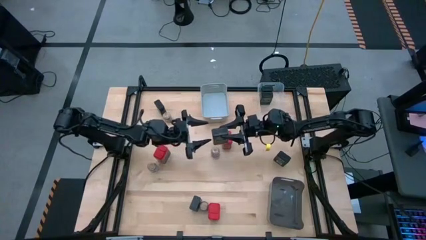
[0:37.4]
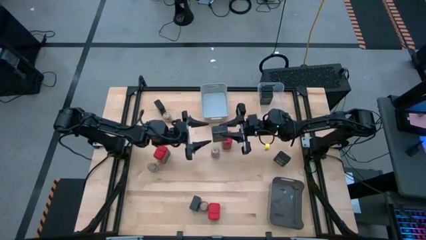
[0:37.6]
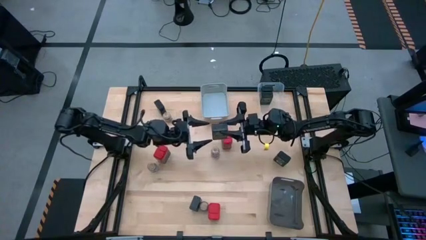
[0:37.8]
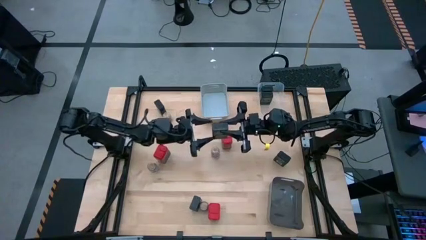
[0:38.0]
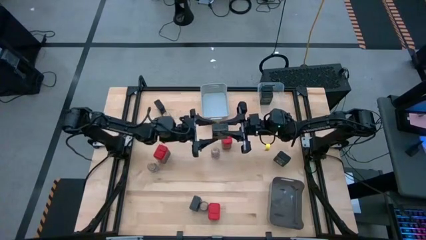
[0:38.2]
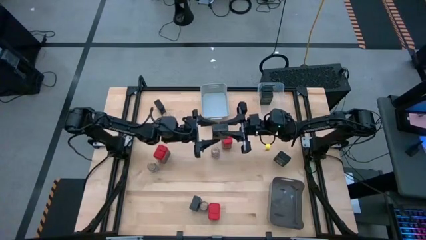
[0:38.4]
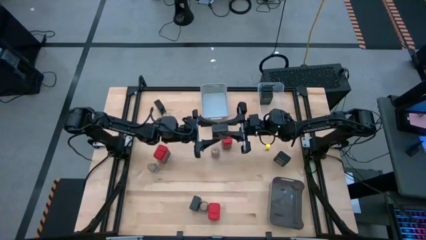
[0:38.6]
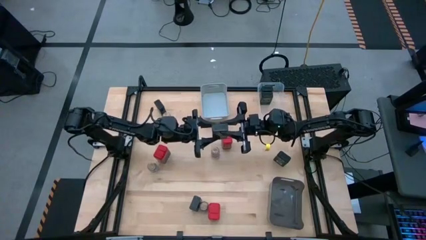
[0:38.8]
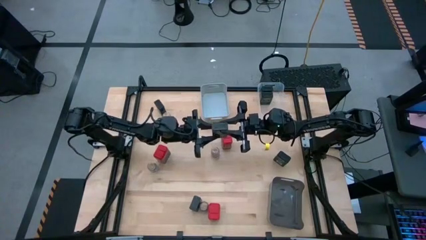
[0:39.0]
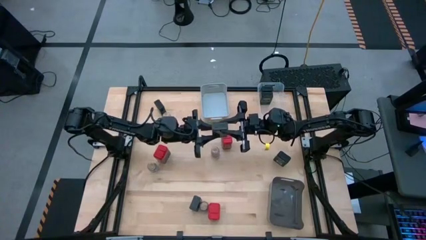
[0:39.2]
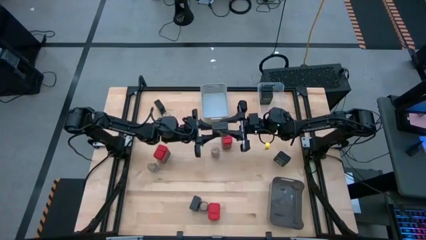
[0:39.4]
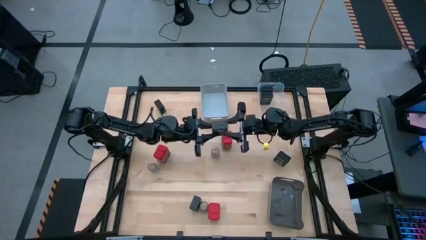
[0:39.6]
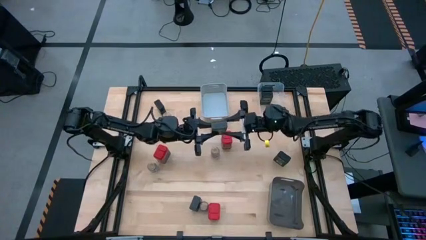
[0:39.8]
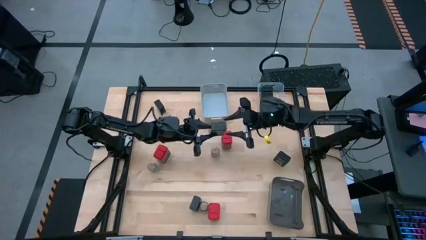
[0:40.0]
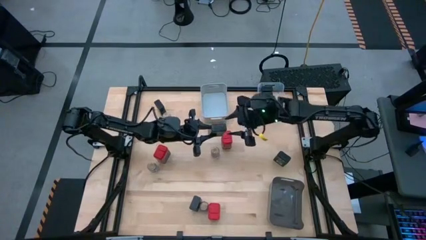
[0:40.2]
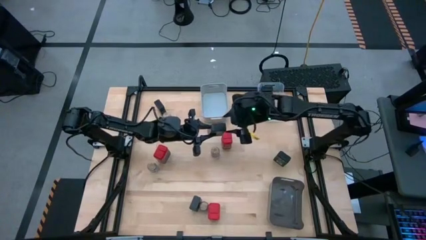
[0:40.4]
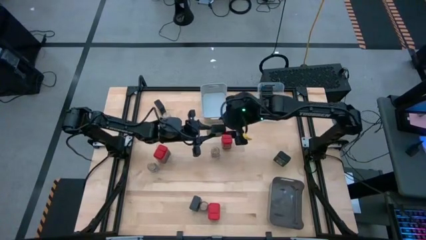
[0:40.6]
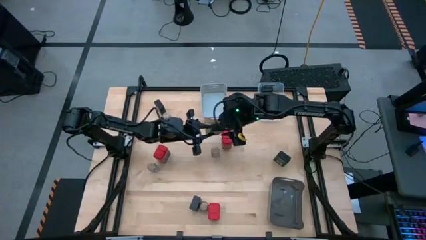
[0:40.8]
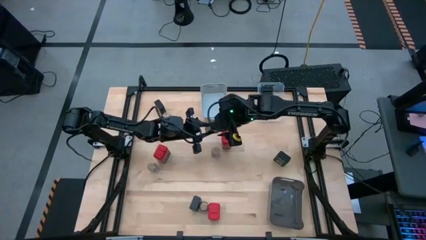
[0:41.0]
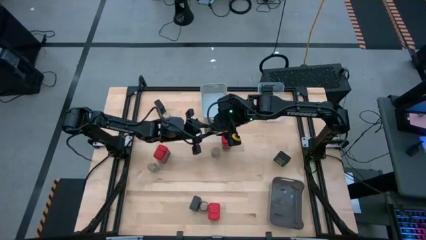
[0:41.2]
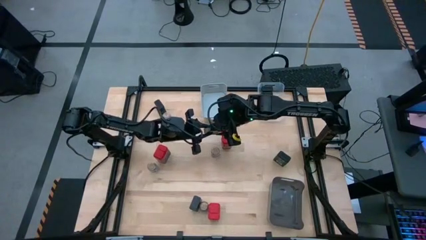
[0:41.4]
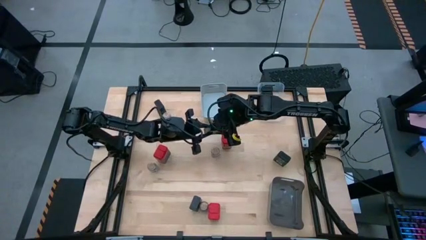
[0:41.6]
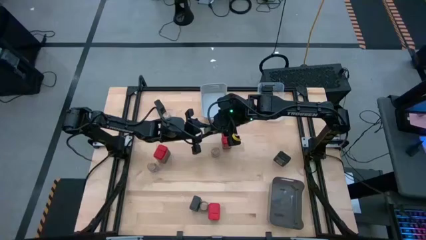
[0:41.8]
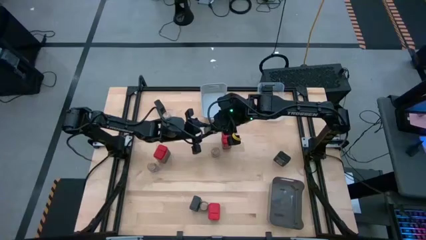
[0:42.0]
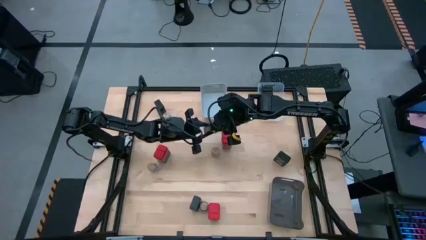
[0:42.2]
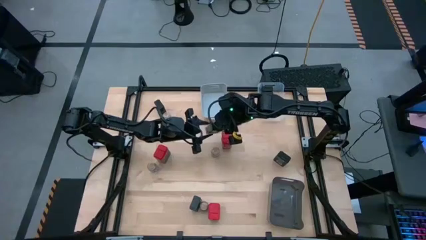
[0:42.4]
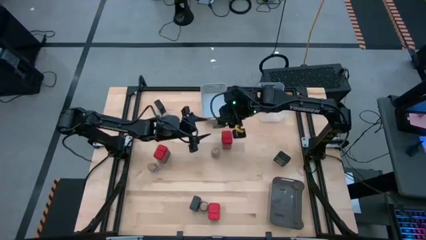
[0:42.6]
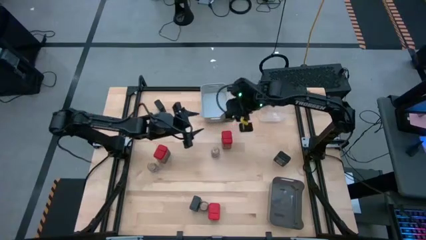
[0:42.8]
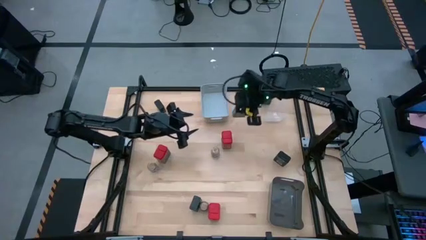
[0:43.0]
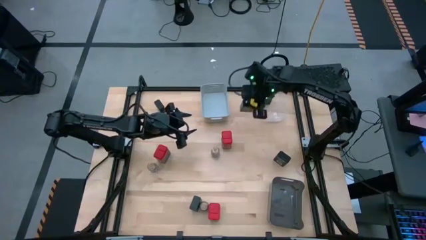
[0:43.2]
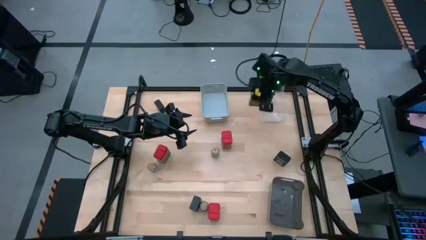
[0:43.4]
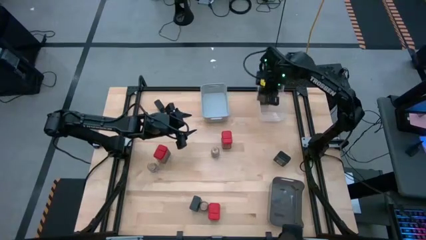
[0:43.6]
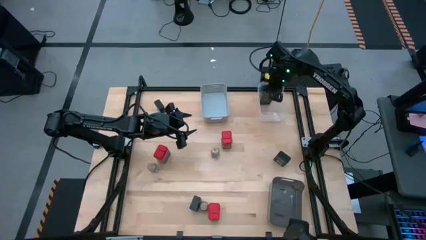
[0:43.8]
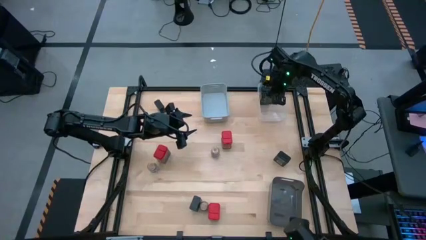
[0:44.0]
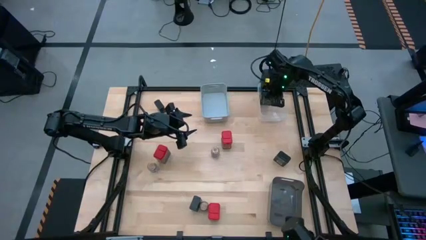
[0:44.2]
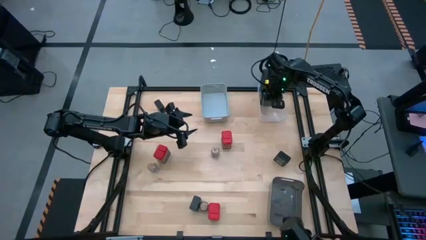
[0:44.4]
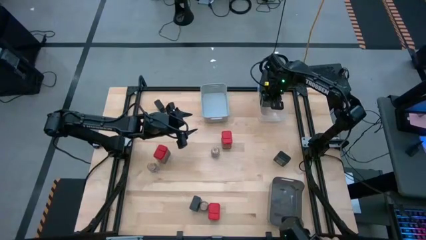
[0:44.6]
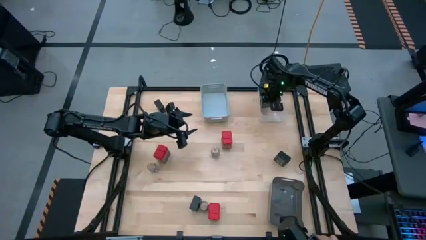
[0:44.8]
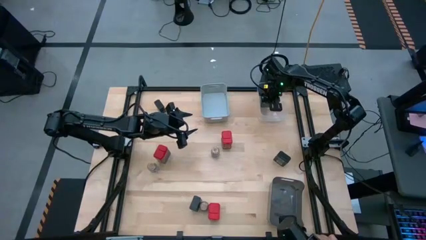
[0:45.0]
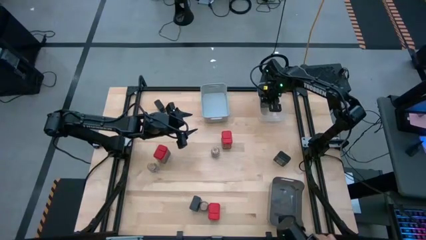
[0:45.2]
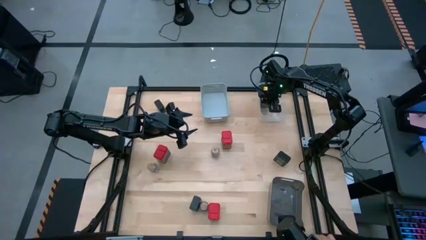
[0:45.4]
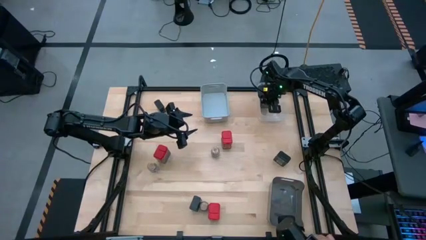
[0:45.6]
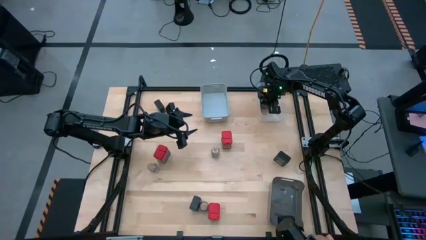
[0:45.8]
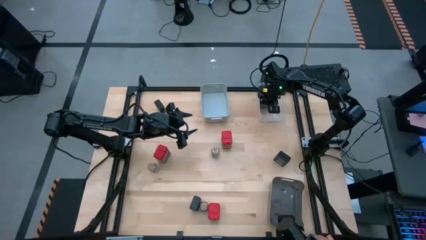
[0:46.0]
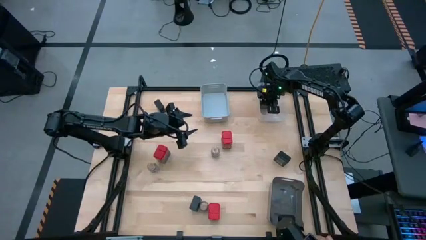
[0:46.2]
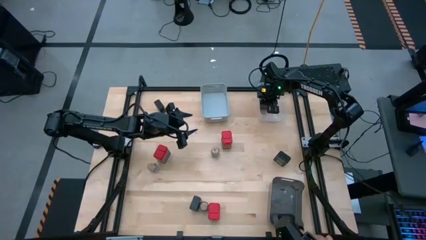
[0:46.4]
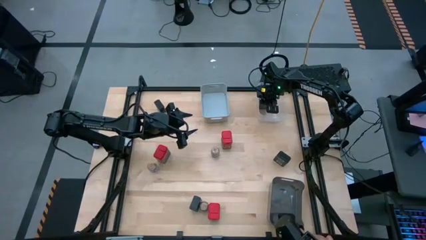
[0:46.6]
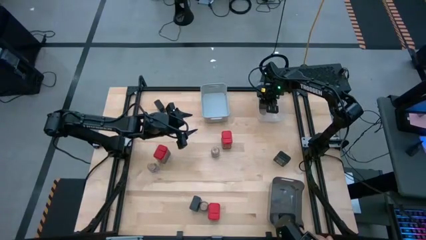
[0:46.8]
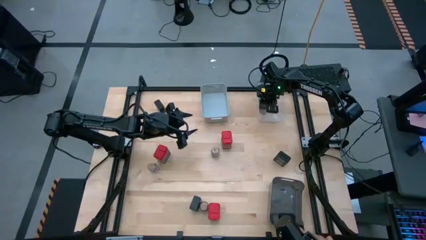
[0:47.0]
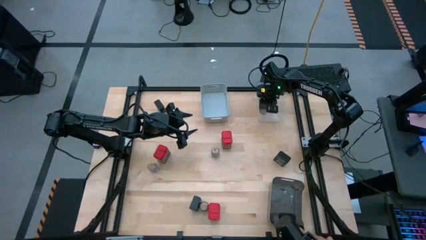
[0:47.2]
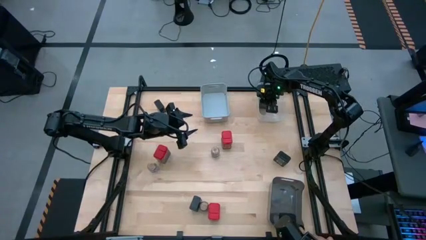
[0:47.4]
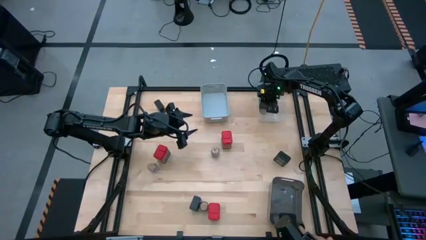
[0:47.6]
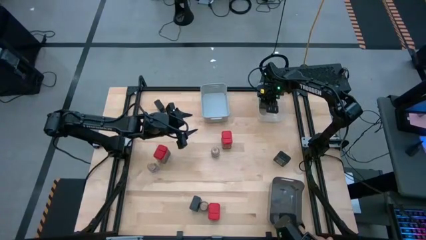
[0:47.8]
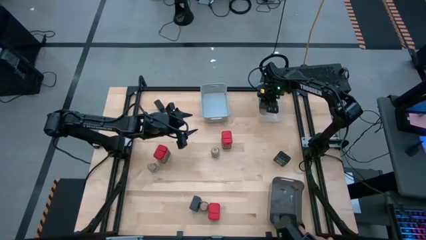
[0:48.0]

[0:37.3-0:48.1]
Task: Sort spices by type
Put the black seasoning can into the transparent bin
